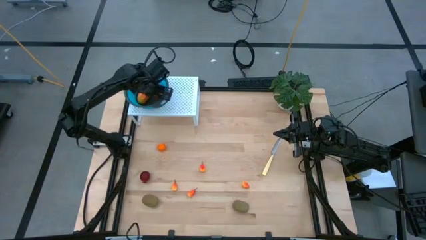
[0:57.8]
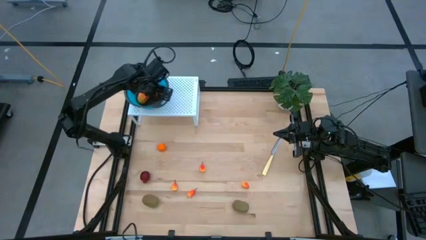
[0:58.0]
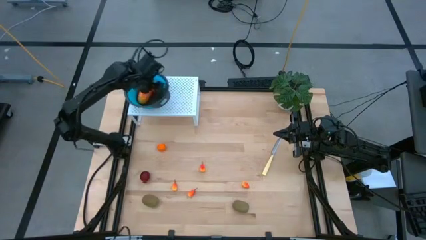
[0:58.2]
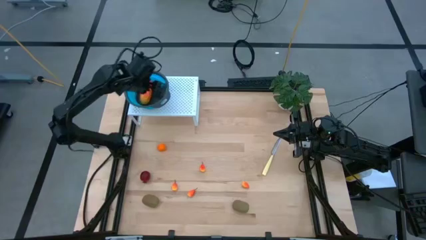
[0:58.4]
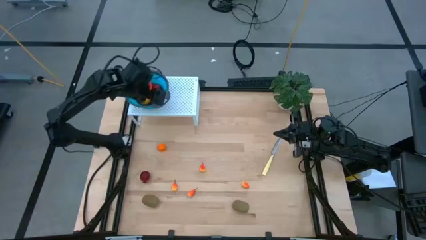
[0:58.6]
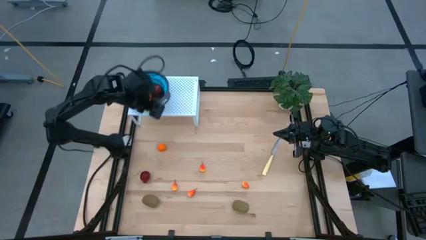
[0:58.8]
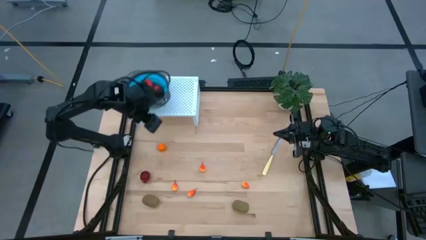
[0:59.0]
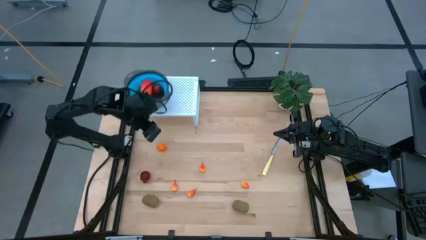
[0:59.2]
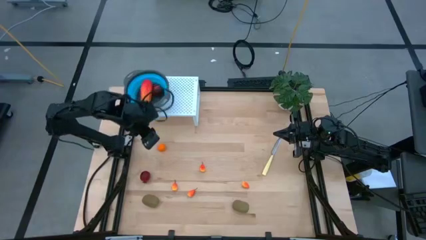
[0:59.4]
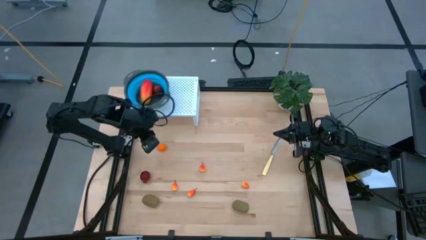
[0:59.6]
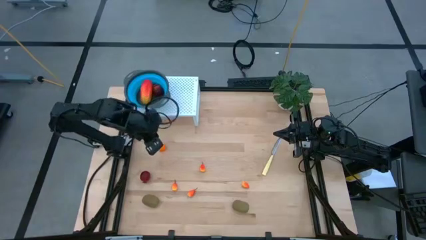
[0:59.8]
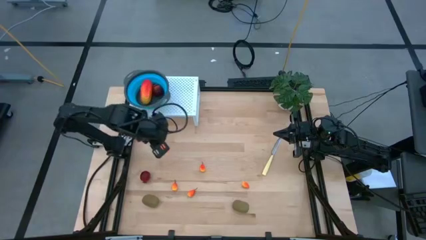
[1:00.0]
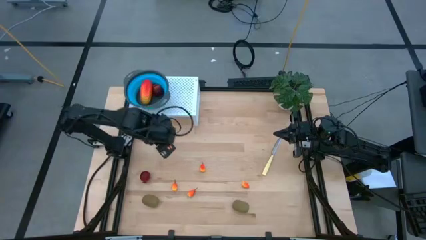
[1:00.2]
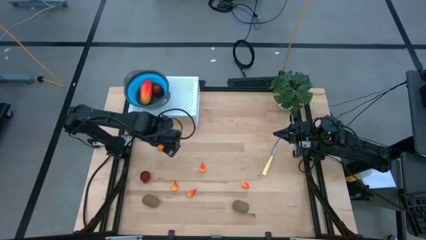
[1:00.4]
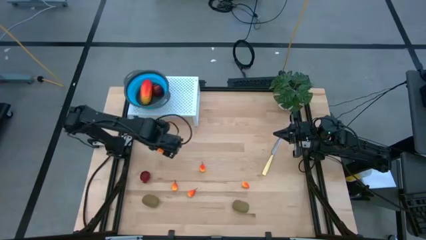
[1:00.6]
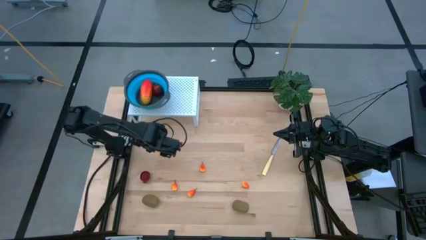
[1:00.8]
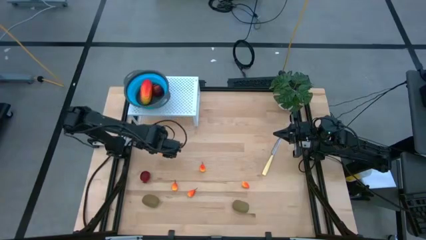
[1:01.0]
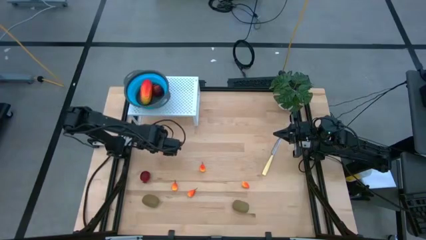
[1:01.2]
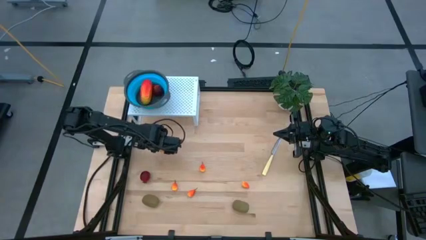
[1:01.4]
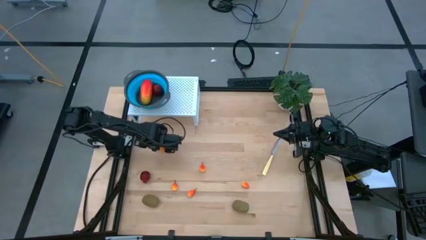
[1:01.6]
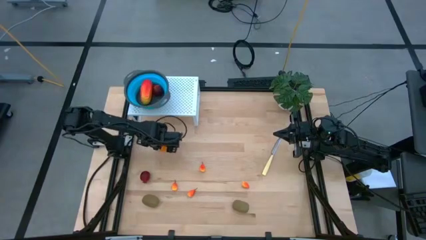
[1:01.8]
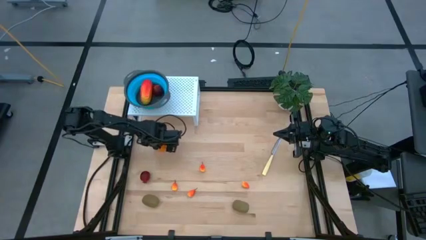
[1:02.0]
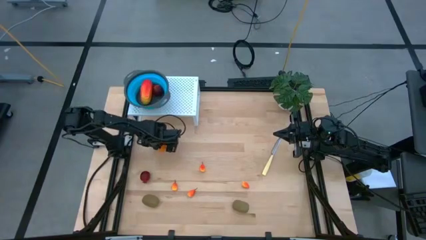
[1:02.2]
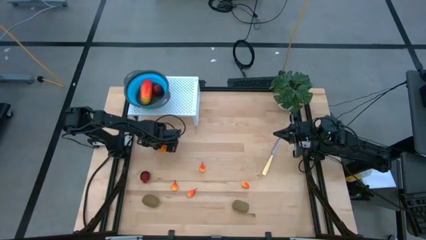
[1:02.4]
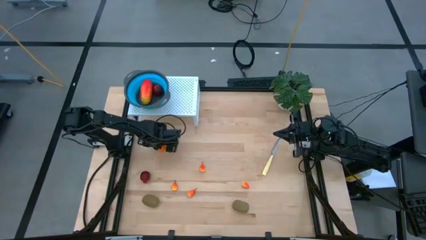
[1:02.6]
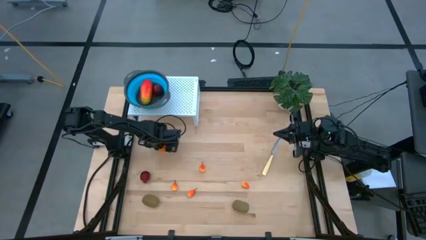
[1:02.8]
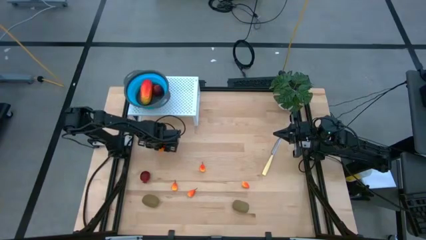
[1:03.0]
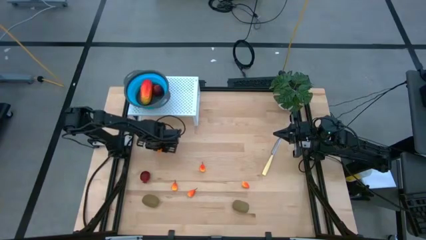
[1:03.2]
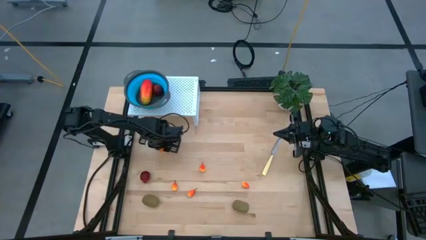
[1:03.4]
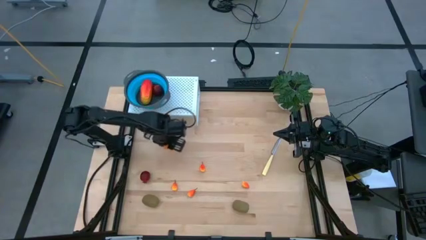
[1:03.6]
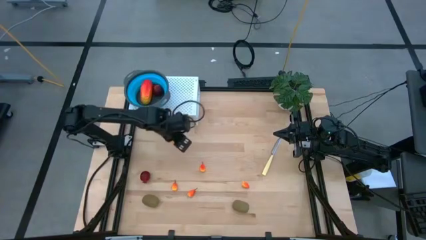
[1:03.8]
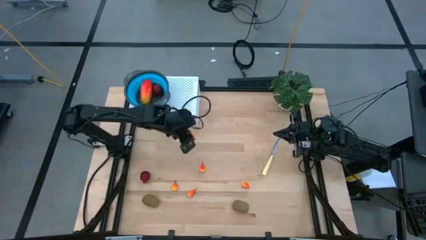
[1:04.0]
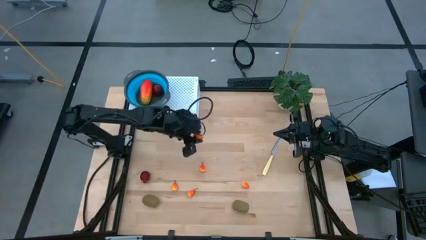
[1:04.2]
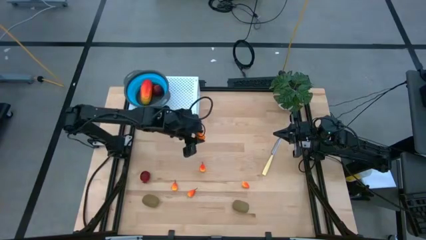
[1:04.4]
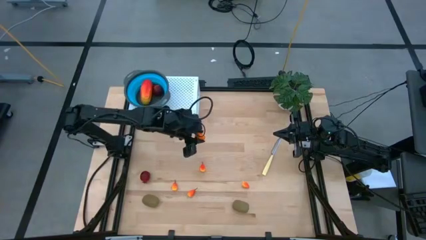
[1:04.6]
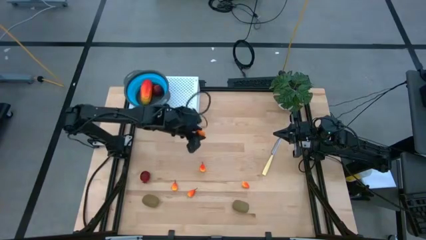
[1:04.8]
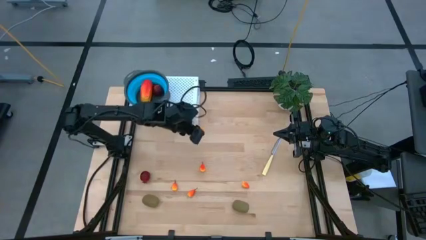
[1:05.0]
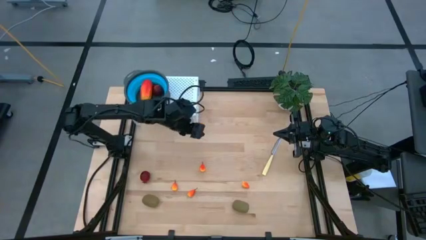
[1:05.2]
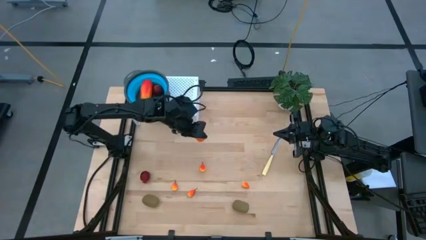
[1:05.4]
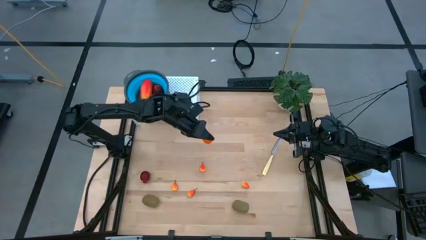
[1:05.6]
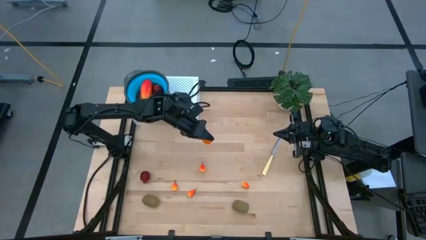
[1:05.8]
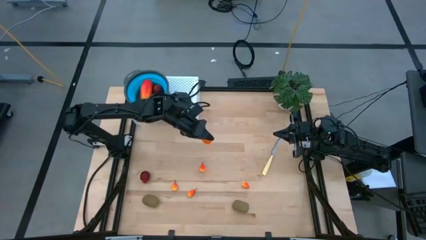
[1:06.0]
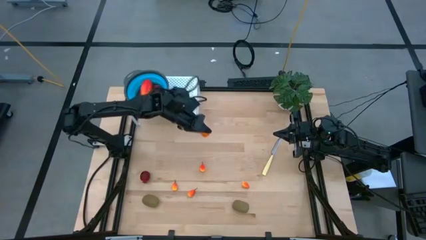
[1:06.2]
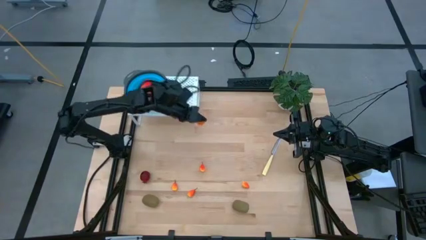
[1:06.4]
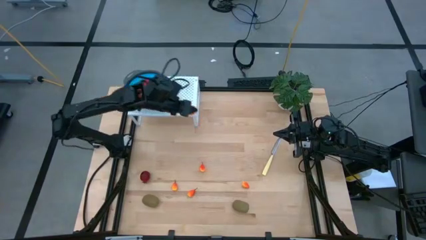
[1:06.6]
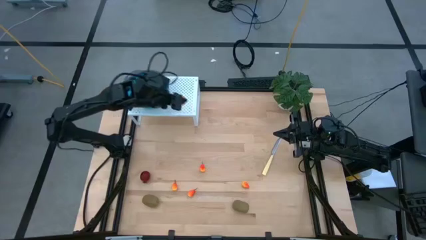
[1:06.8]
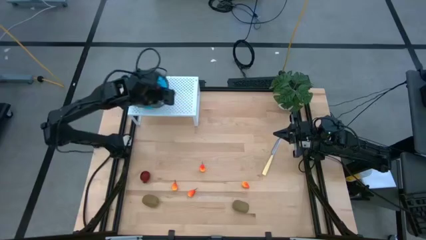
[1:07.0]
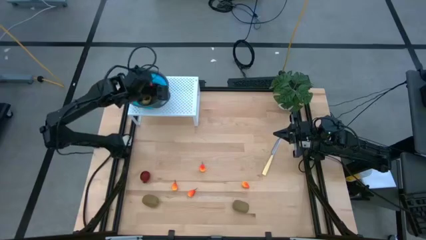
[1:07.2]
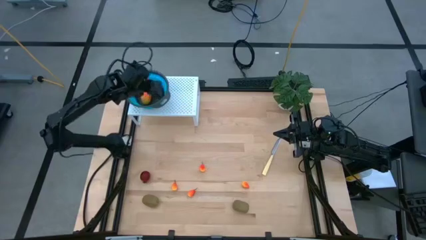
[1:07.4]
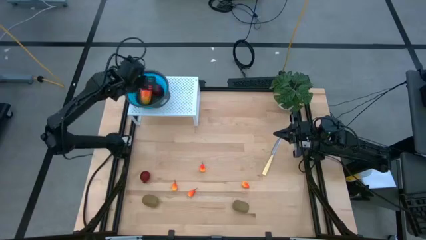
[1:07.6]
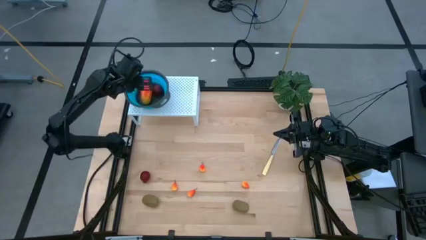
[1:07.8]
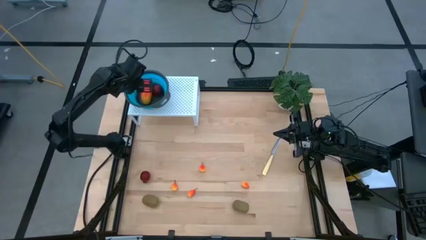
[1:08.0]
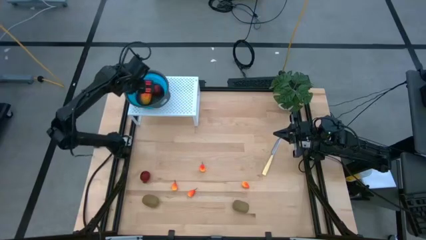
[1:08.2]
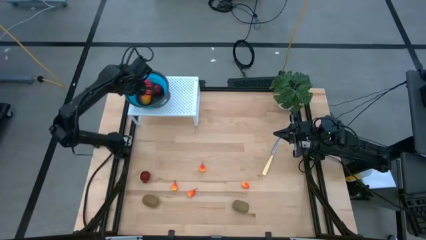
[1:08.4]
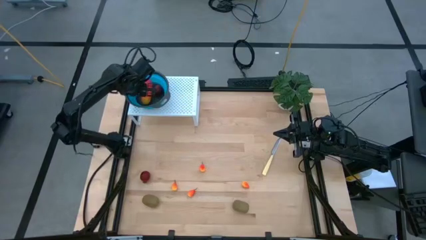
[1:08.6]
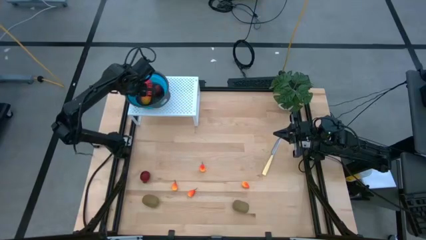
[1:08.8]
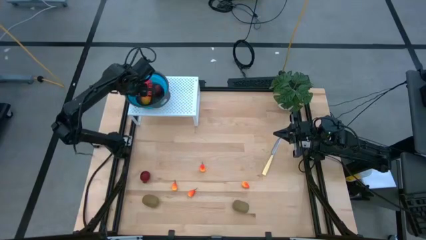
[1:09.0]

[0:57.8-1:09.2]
Task: Pick & Place Fruit
Put the orange into the blue strainer bowl on the shelf

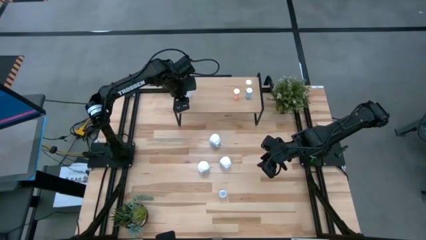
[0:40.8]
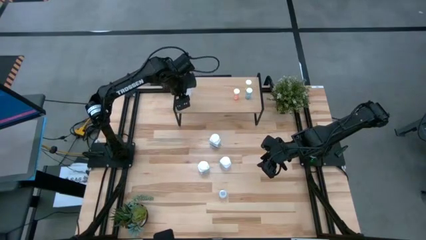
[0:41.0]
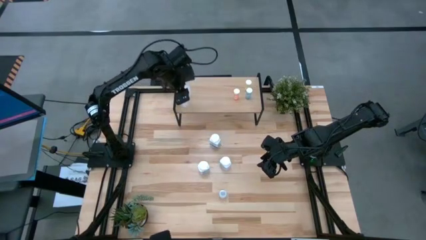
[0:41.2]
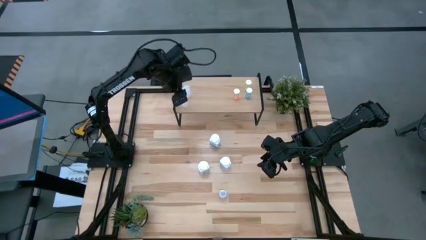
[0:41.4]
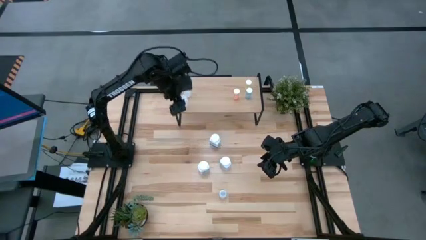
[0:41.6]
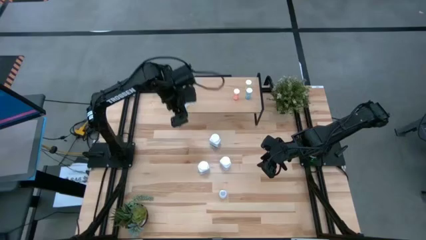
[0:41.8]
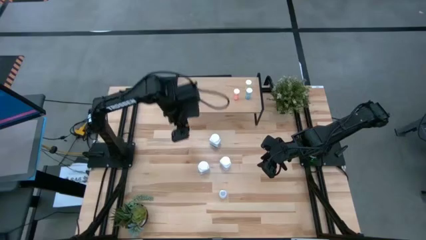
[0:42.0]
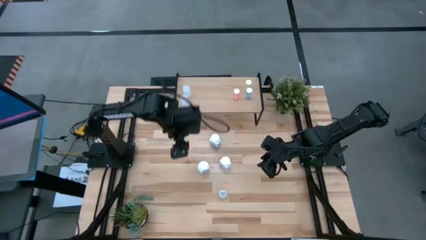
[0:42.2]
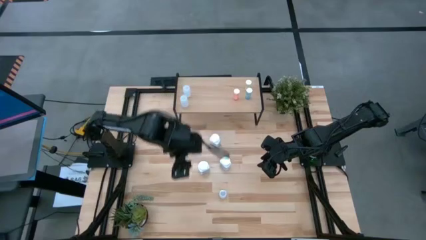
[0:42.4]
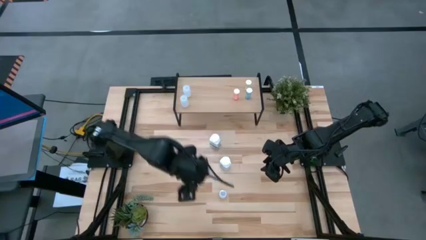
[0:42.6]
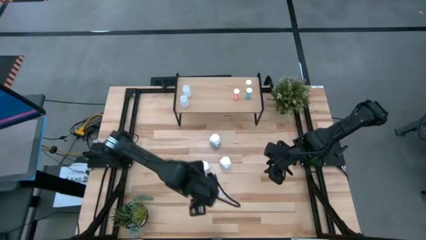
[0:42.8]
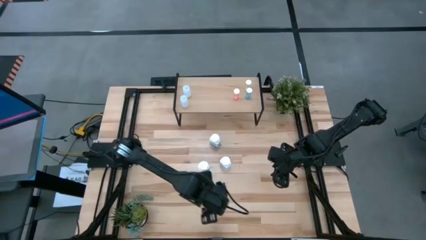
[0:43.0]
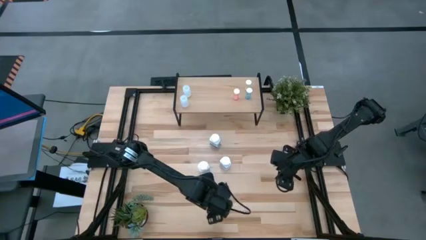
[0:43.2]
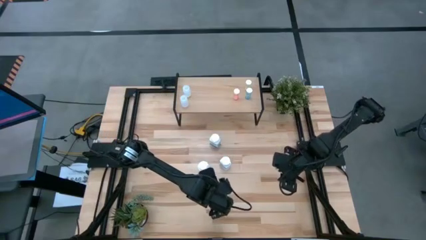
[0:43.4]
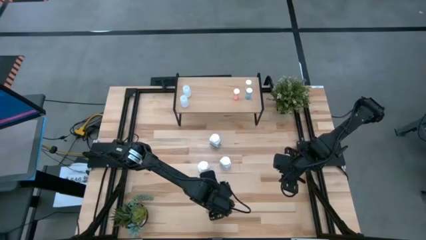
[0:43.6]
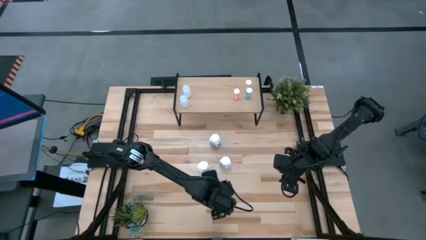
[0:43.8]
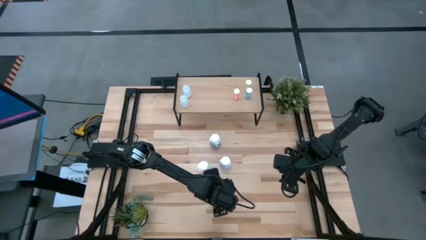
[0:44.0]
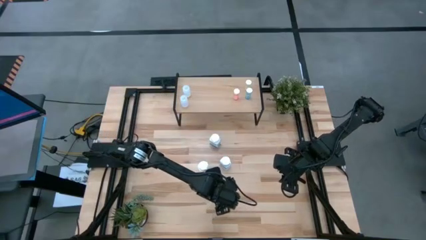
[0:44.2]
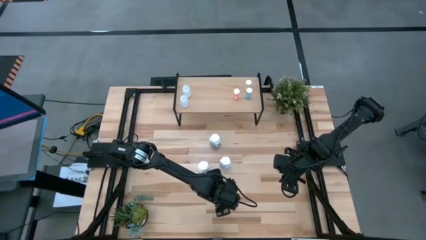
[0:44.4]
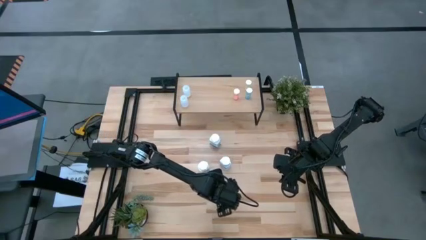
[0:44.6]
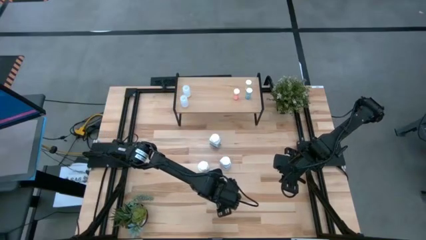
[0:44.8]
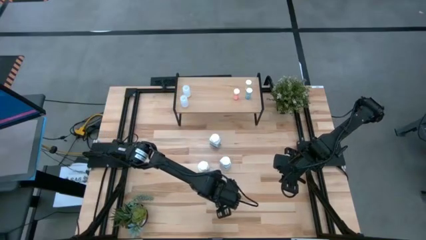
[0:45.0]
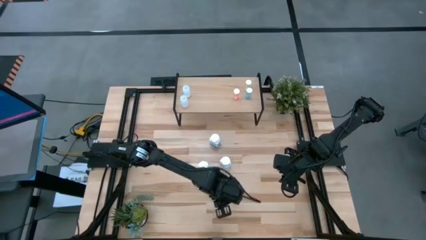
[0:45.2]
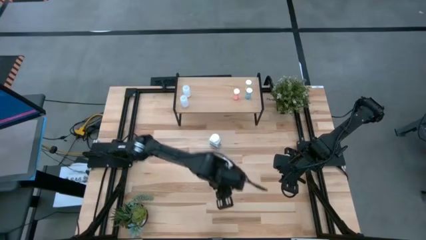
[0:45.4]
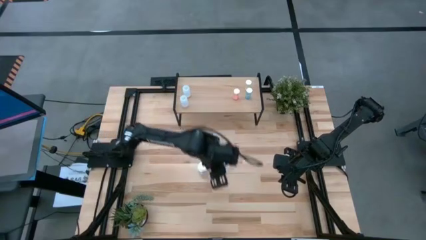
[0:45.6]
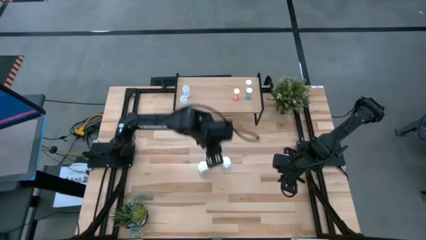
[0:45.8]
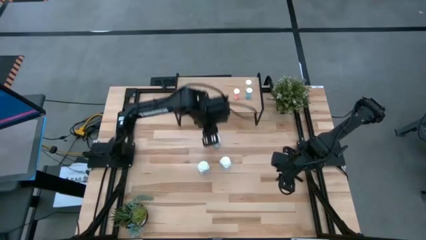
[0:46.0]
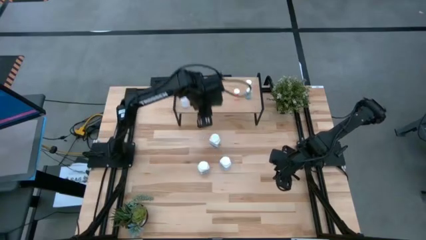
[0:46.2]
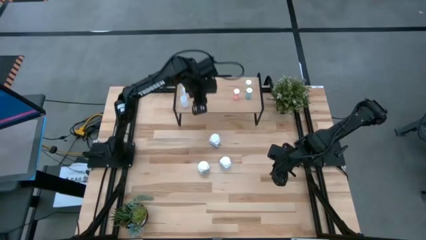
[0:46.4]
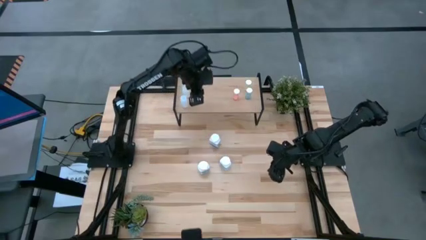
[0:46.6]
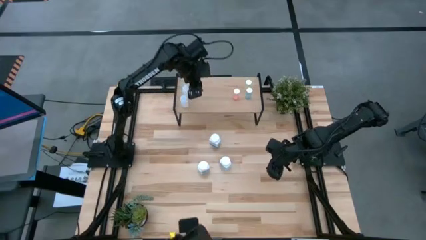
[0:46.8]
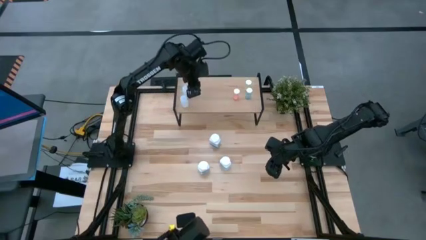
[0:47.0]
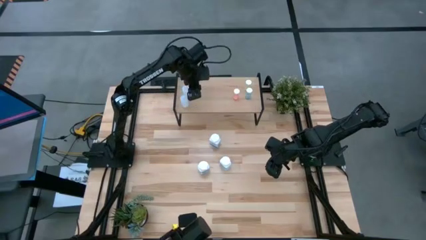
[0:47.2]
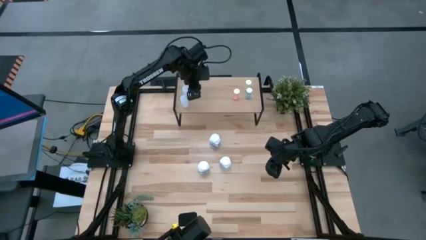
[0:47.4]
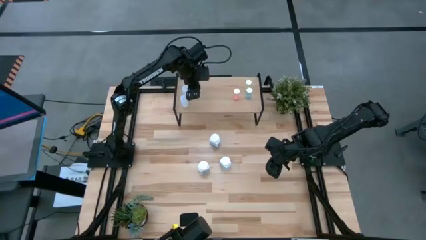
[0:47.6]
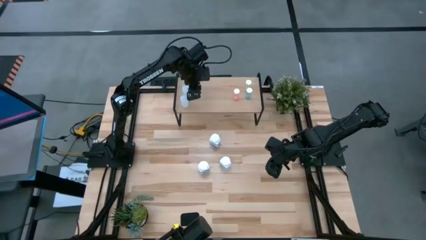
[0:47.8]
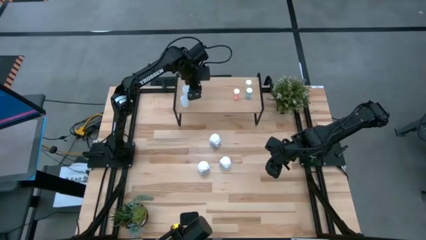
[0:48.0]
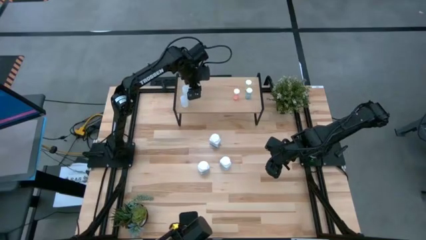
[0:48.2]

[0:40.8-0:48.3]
Task: Pick and place medicine bottles onto shelf by color
Put the transparent medicine bottle on the shelf
